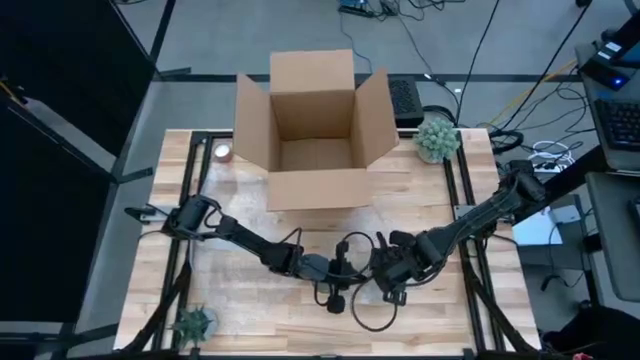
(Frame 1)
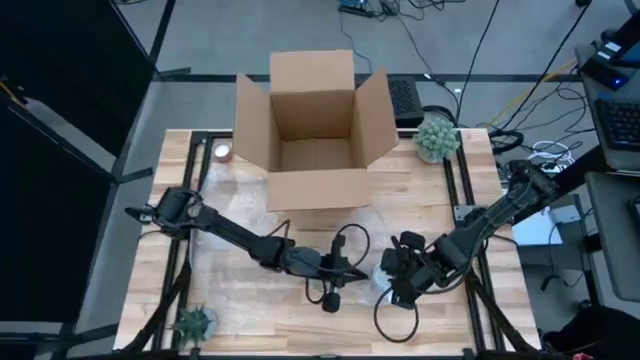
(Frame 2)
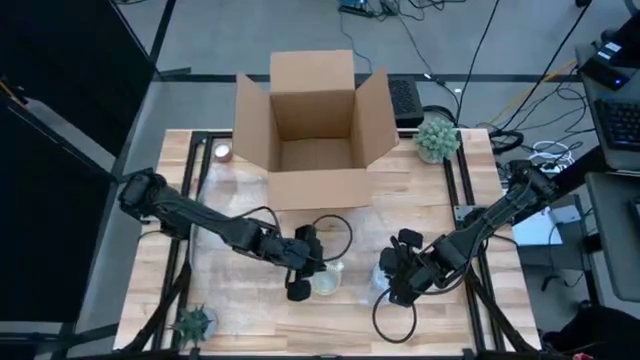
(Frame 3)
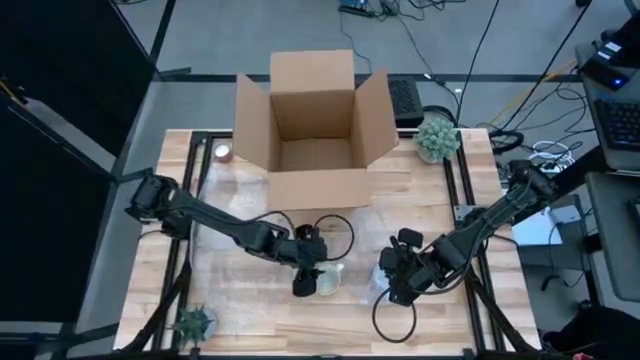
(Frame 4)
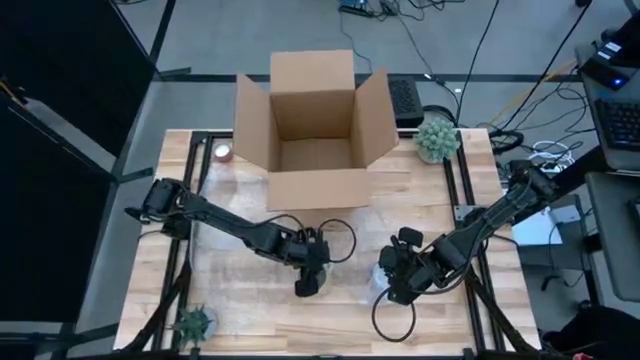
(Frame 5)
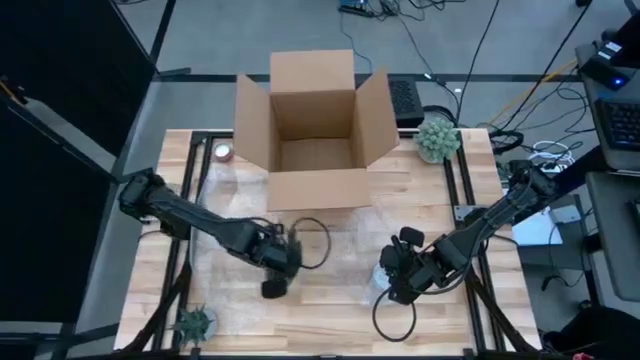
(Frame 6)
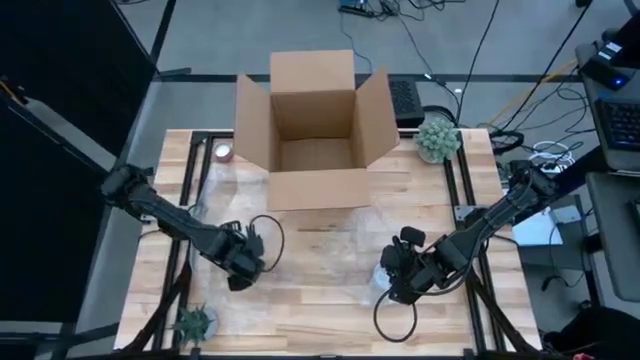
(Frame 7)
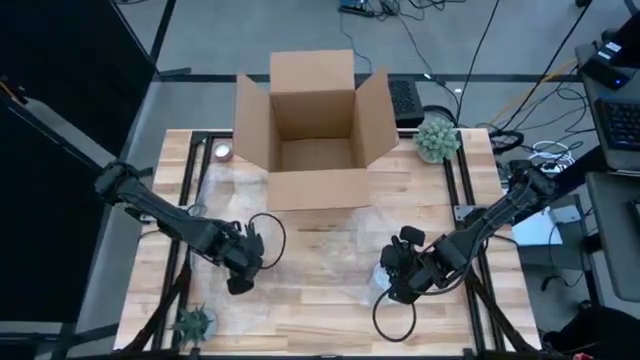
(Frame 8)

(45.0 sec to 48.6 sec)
Task: wrap mug
Move the yellow mug to middle left of the table

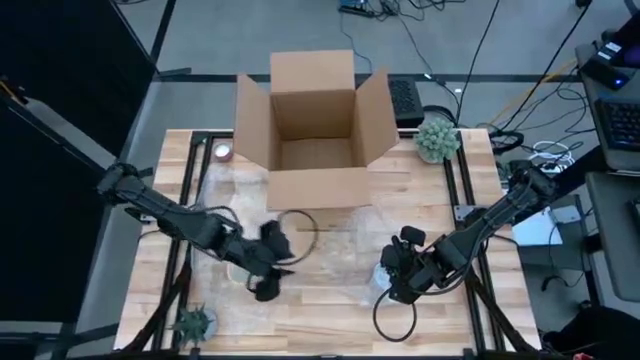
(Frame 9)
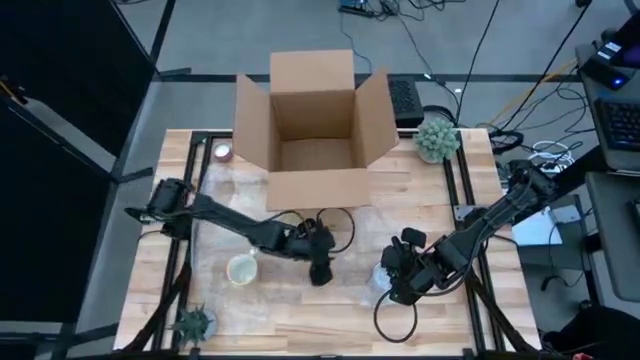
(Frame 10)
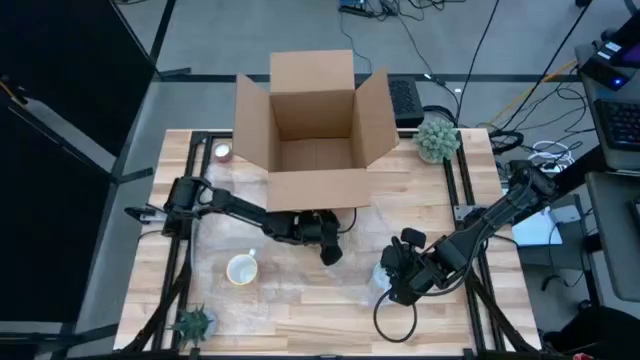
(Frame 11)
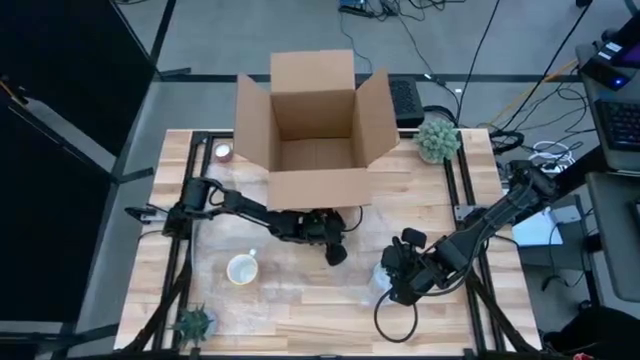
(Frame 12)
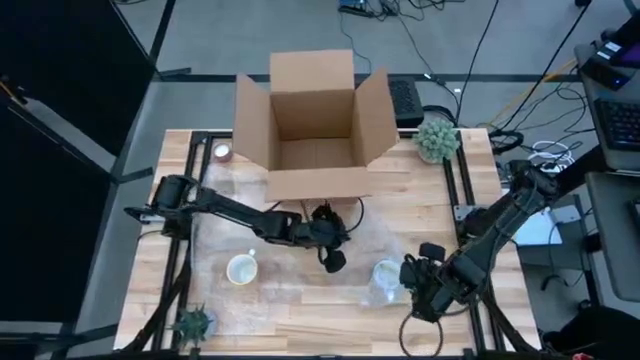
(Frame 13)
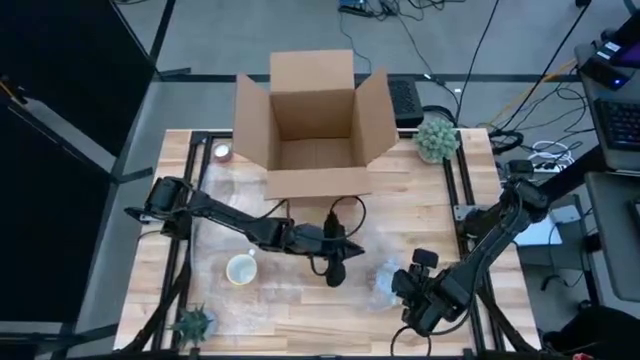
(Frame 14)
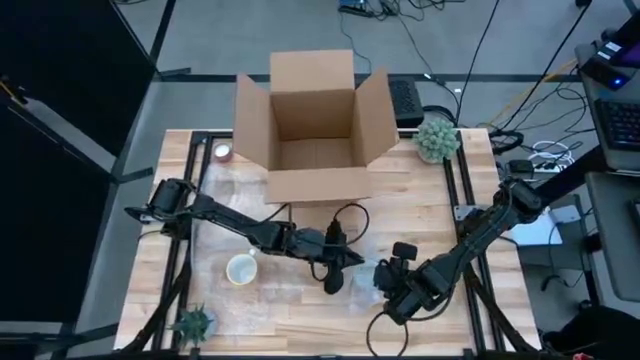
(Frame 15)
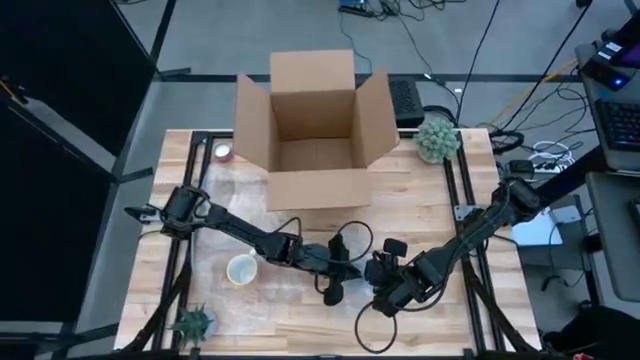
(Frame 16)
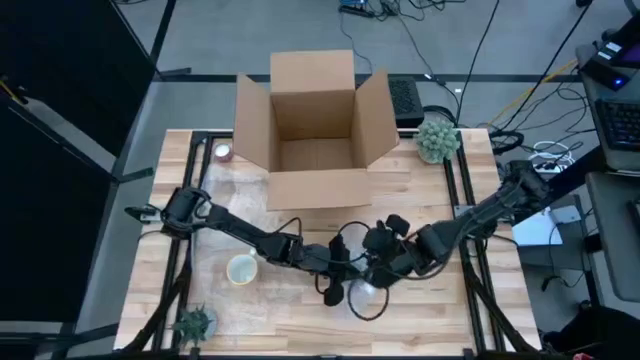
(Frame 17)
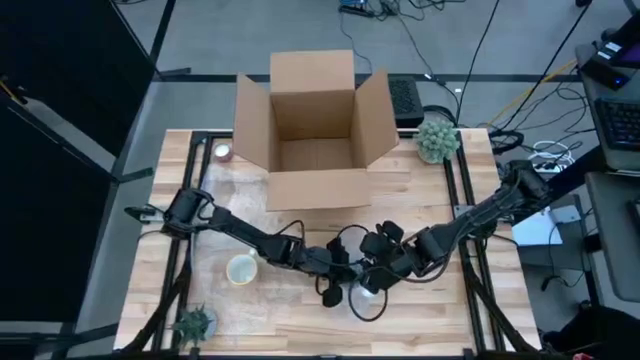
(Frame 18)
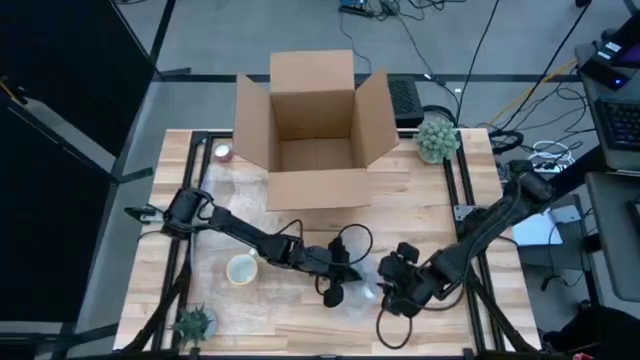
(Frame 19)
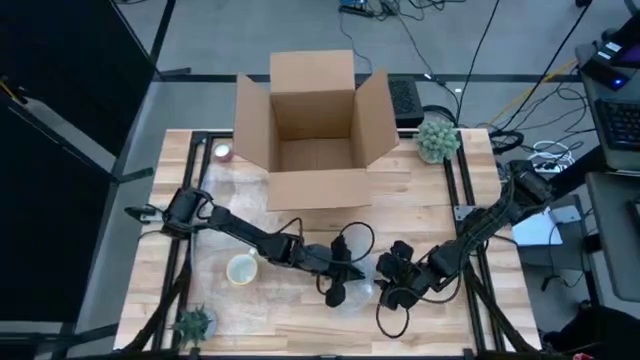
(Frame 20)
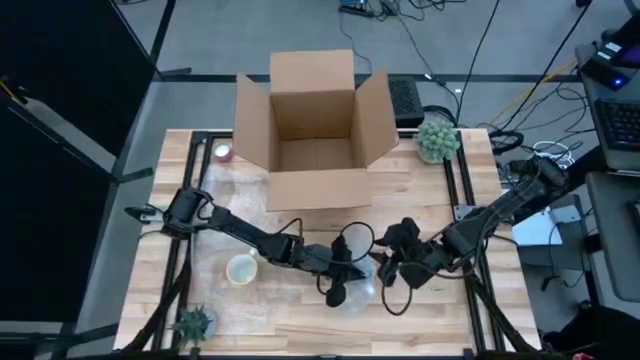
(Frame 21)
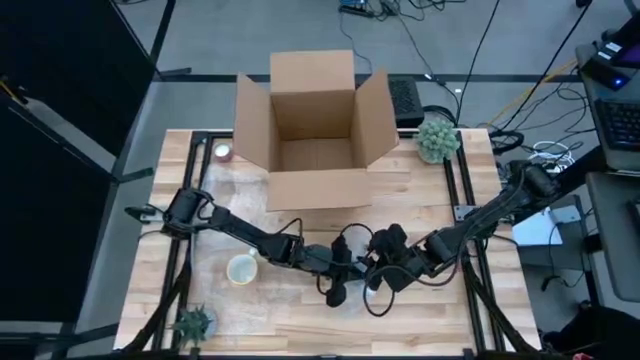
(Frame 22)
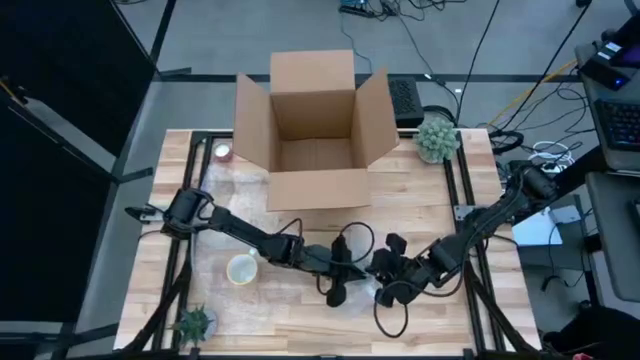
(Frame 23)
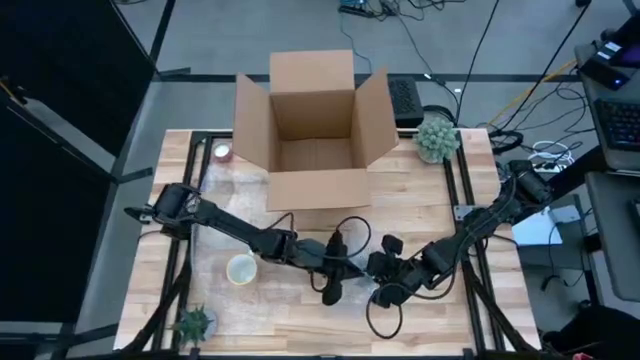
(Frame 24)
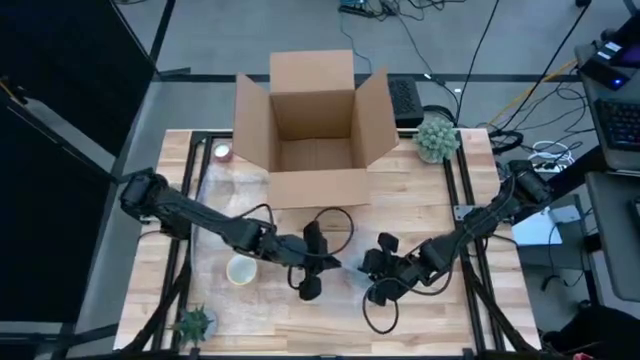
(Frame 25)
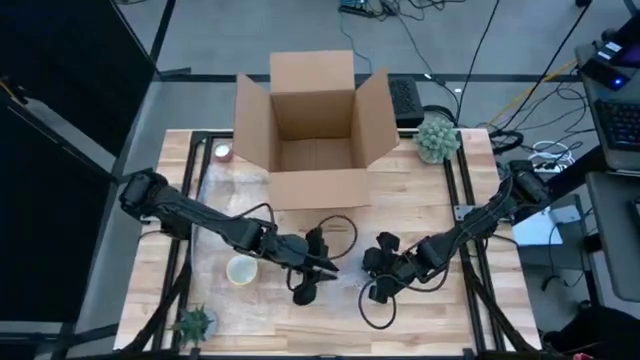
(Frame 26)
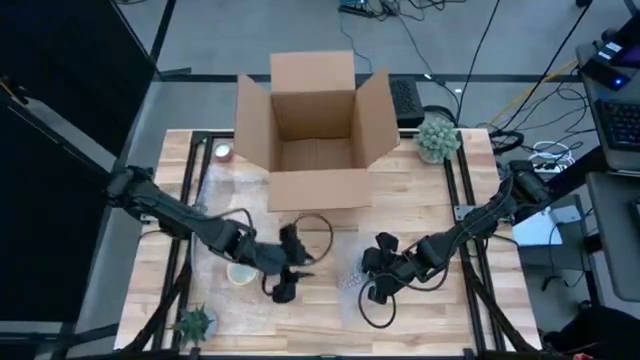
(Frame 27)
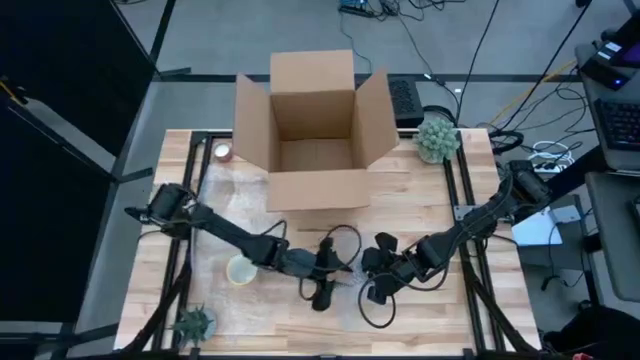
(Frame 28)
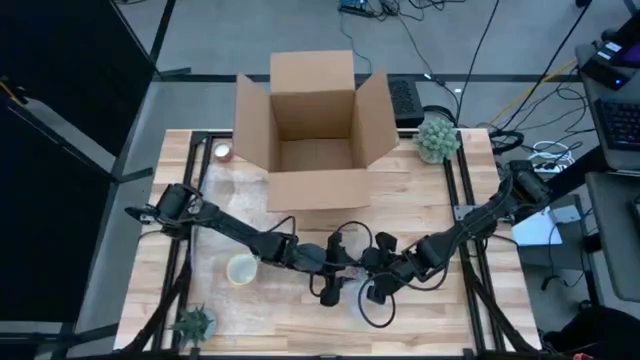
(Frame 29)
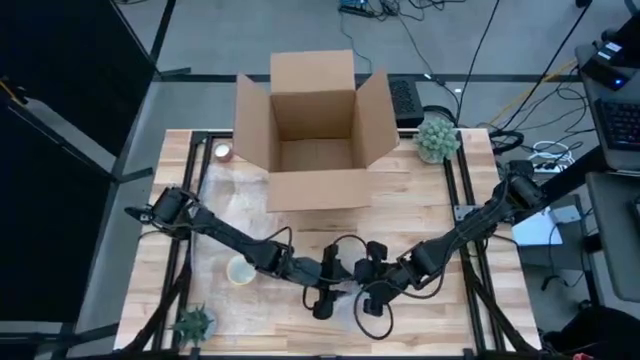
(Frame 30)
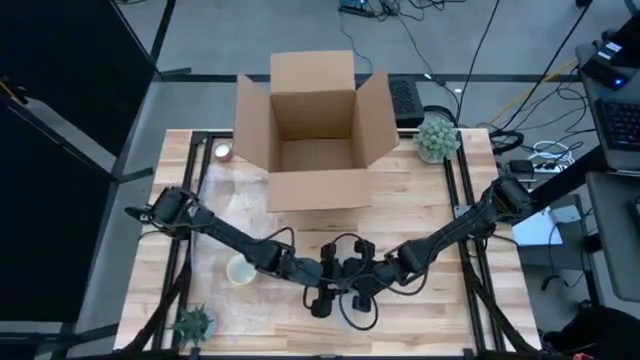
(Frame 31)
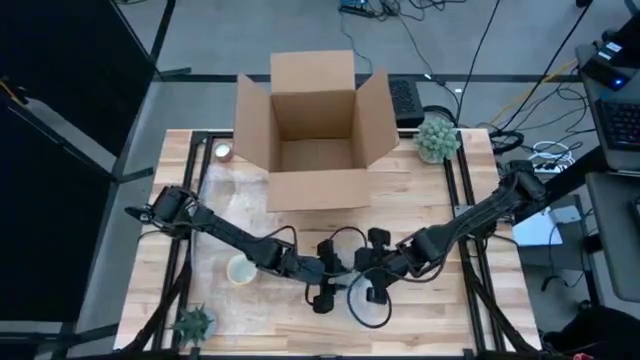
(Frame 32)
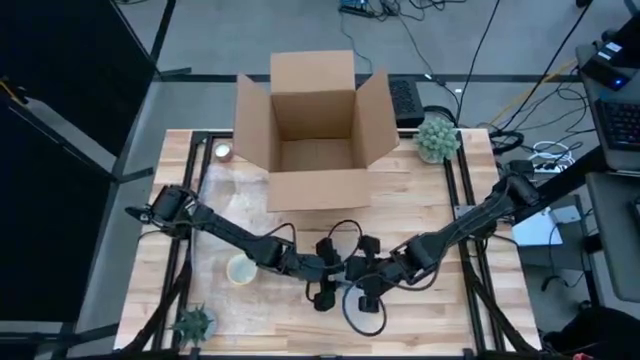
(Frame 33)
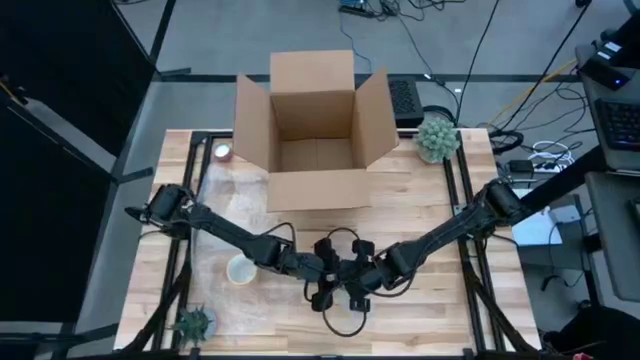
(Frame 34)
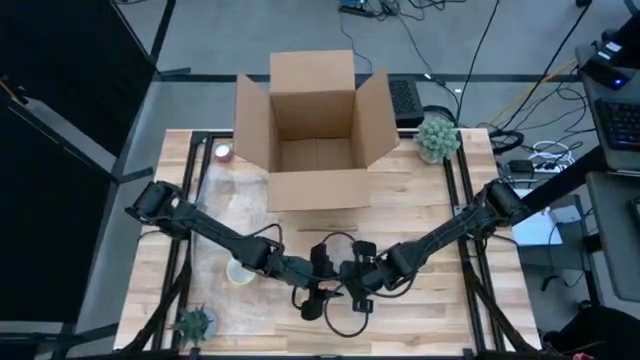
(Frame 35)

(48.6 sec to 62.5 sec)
Wrap the red mug with the bubble wrap

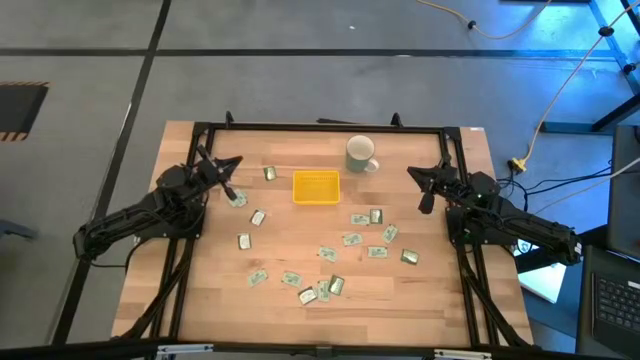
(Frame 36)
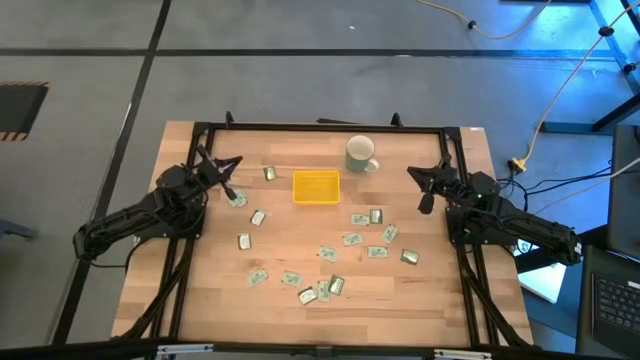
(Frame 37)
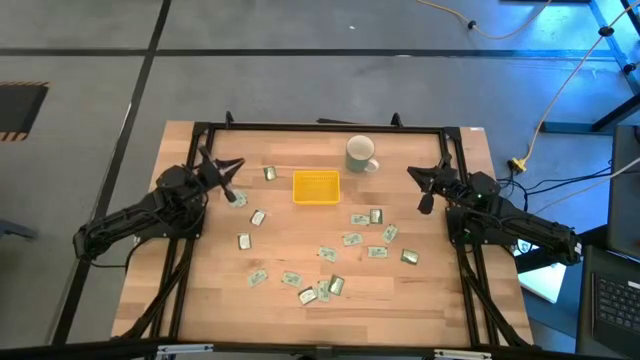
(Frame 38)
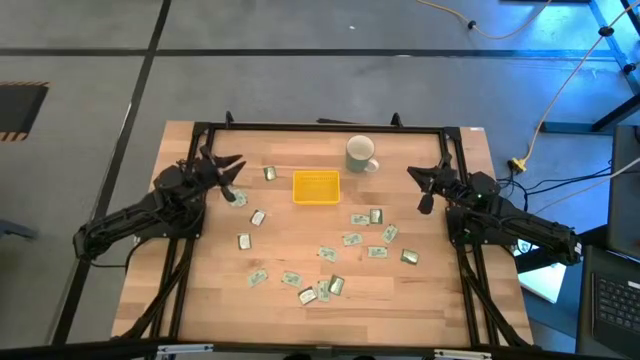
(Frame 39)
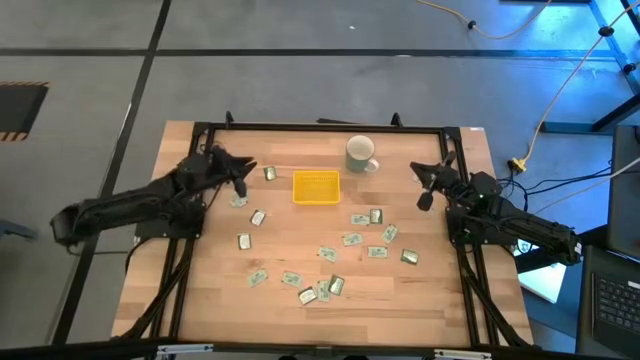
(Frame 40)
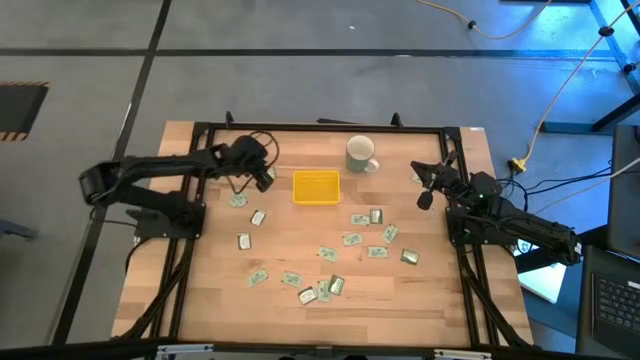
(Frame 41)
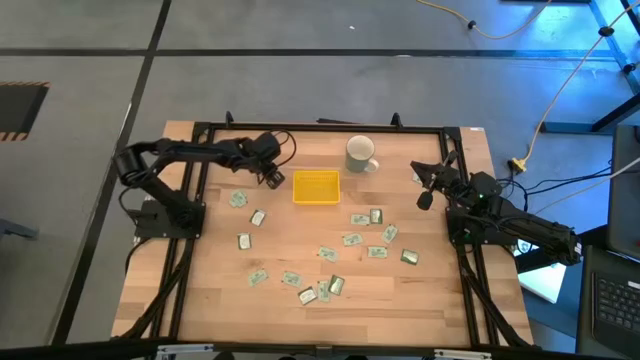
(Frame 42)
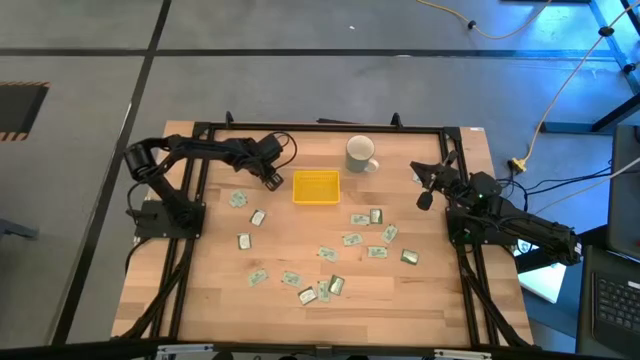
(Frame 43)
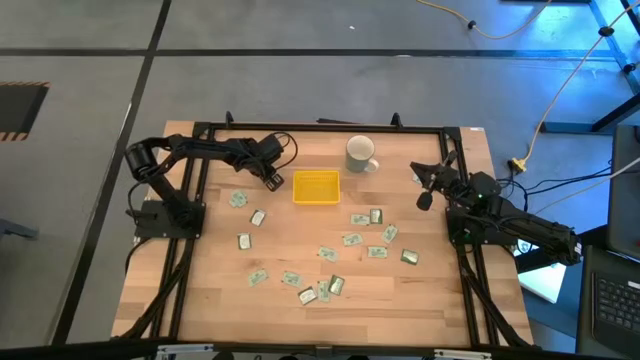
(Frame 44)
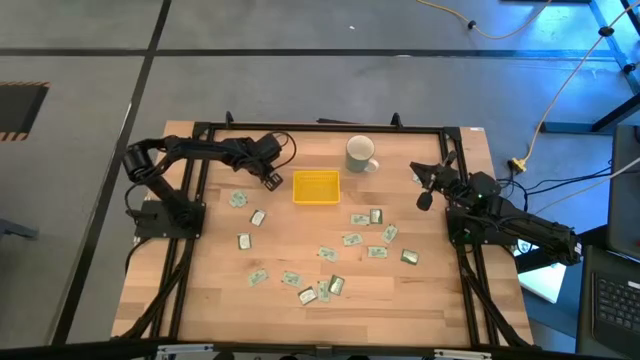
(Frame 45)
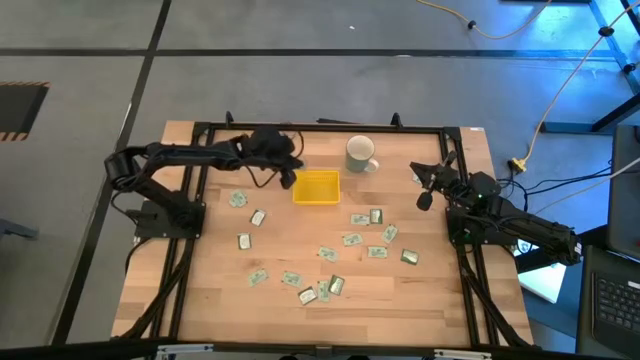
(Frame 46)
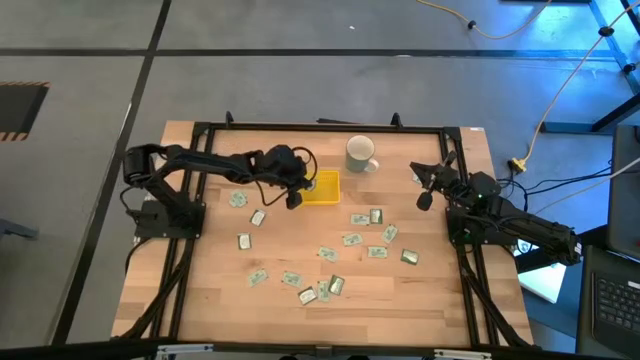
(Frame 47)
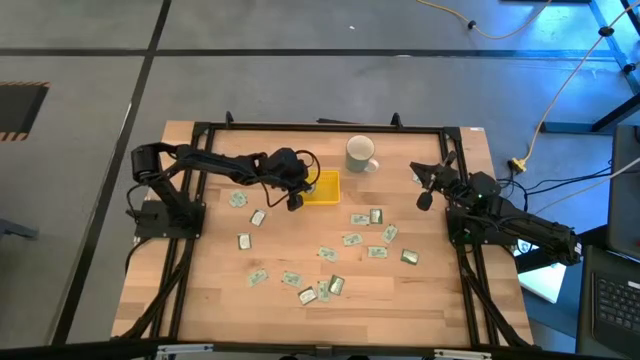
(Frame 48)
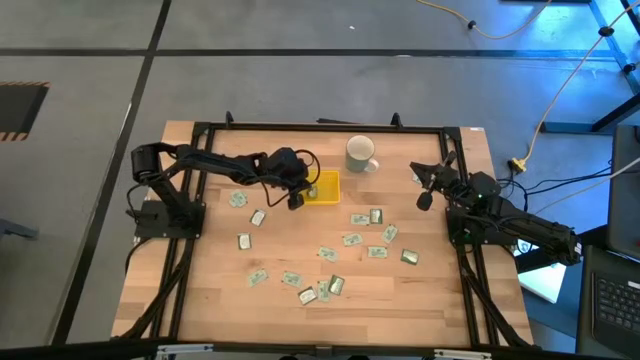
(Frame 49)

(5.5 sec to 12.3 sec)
Task: Pick and place Stevia / Truvia into bins
Put the top left truvia tea packet into the yellow bin
